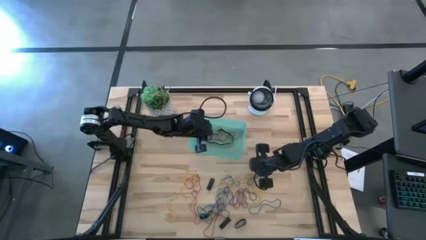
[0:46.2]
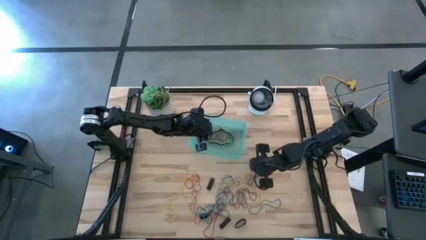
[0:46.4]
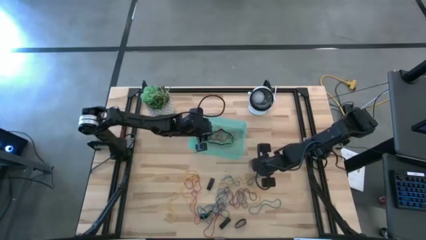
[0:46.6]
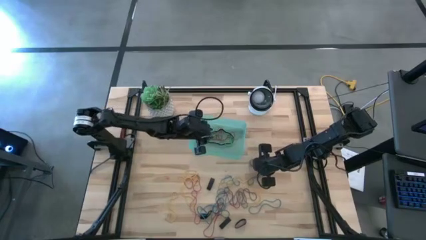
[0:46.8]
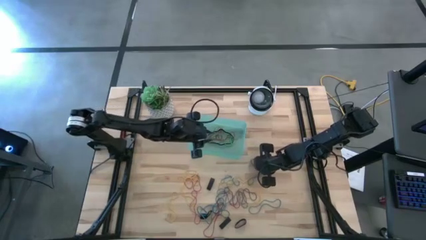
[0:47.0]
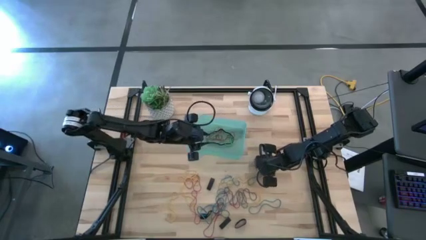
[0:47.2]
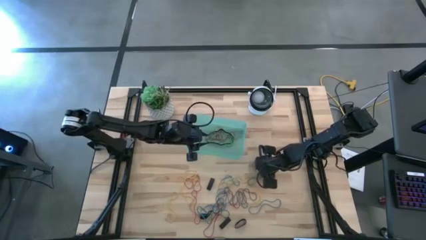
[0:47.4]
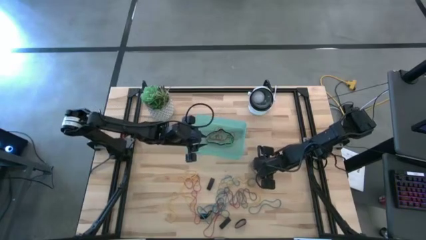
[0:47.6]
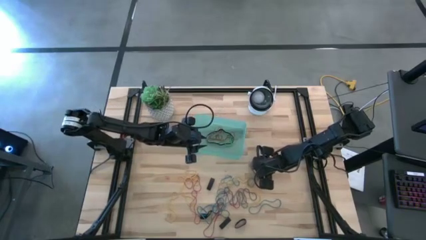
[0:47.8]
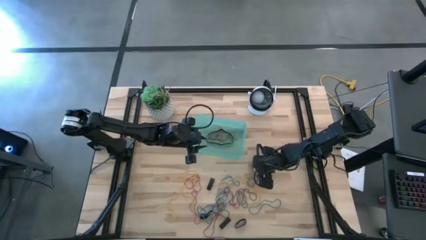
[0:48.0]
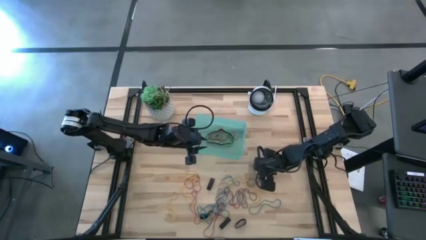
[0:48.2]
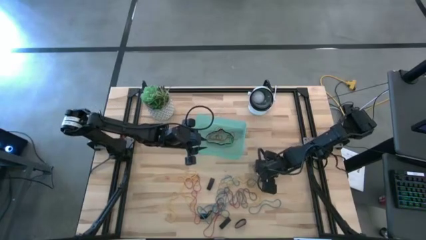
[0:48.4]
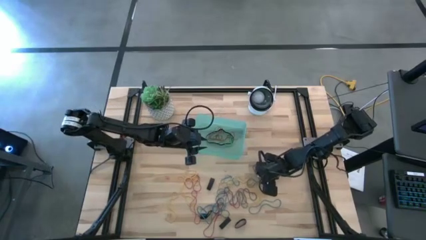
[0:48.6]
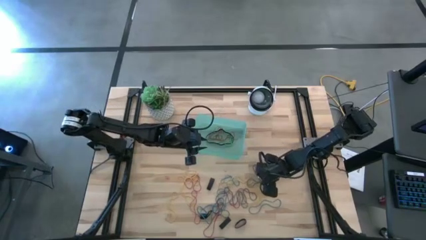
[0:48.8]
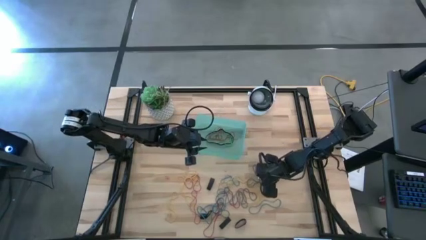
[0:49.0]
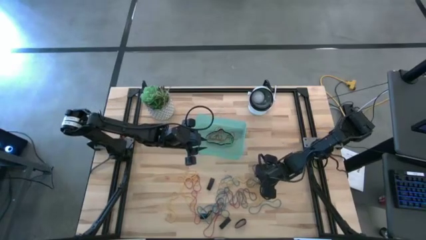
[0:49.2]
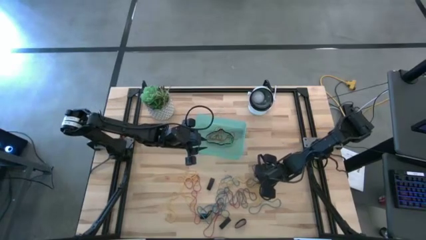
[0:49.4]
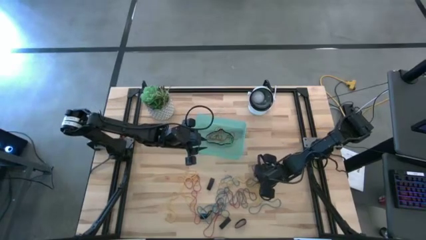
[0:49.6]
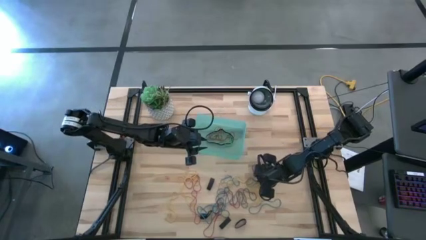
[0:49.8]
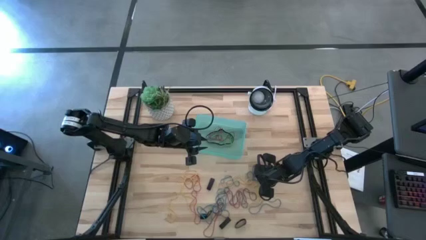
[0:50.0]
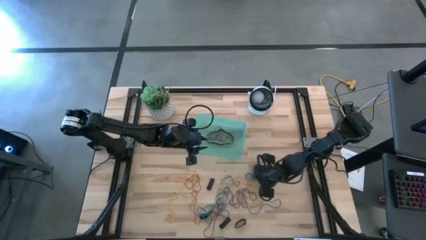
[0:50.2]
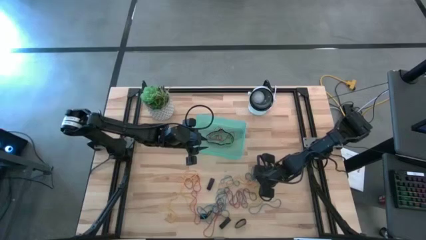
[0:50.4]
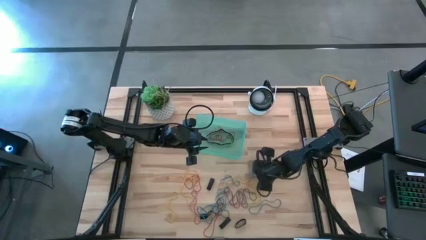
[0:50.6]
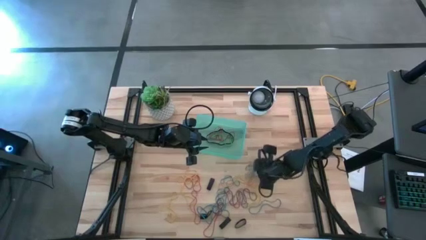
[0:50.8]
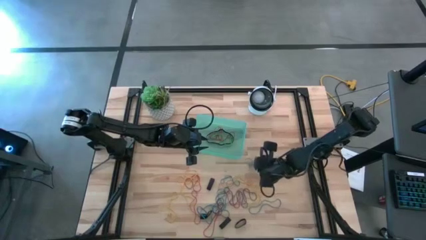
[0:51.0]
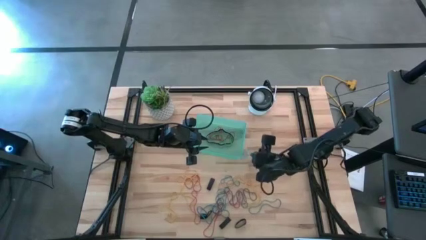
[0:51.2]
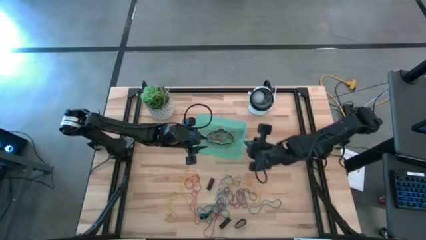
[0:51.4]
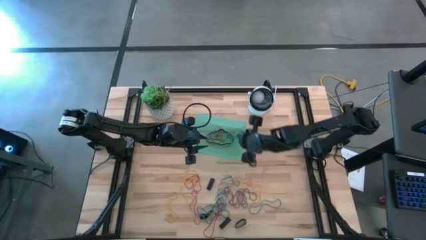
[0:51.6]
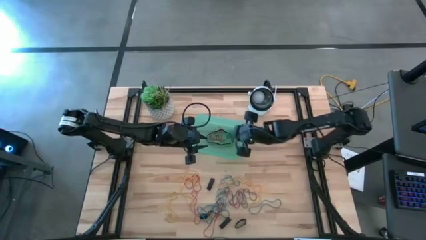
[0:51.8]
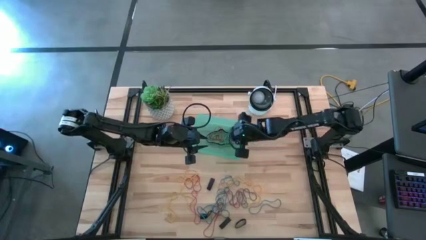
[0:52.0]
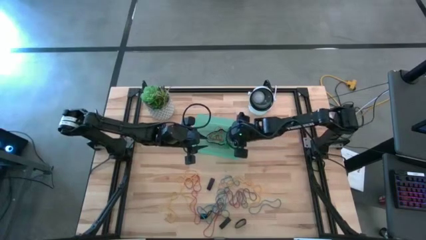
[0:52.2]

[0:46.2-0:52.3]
Task: Pick and place rubber bands into bin
Put the blue rubber band into the green bin

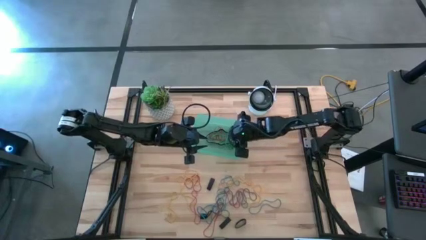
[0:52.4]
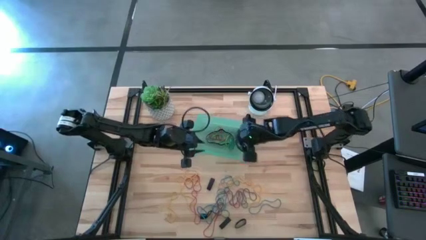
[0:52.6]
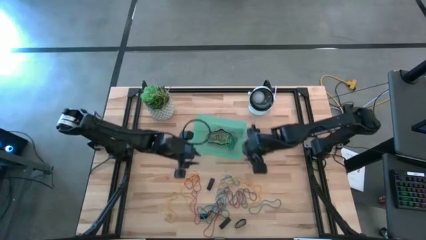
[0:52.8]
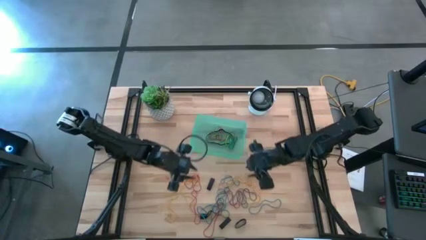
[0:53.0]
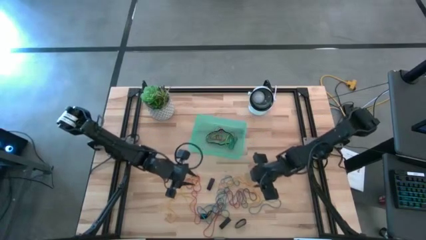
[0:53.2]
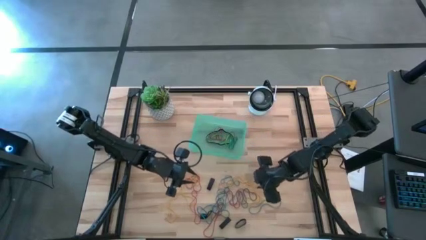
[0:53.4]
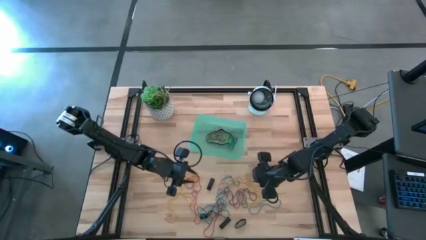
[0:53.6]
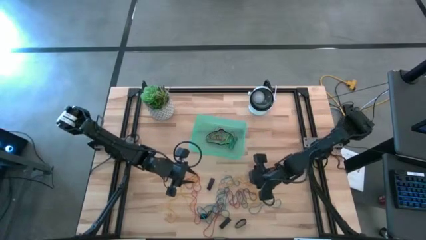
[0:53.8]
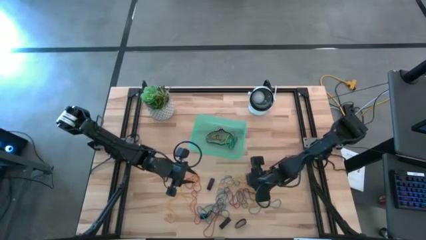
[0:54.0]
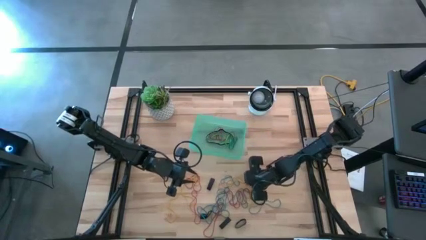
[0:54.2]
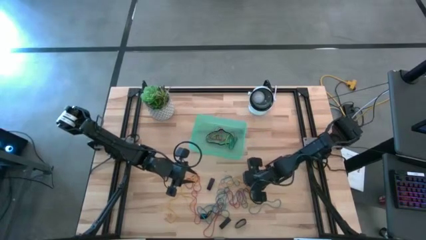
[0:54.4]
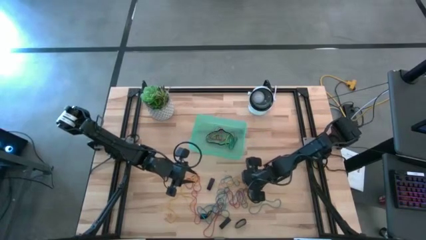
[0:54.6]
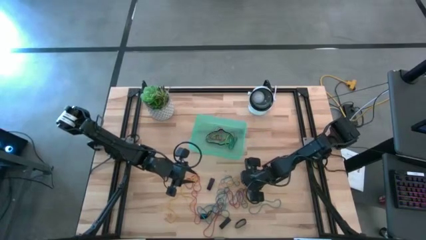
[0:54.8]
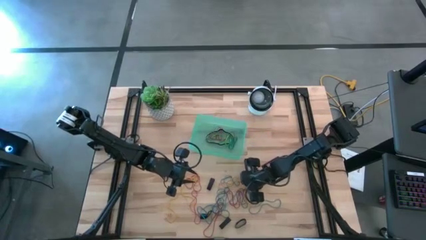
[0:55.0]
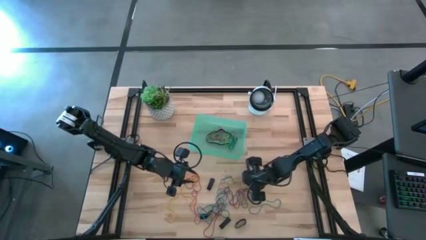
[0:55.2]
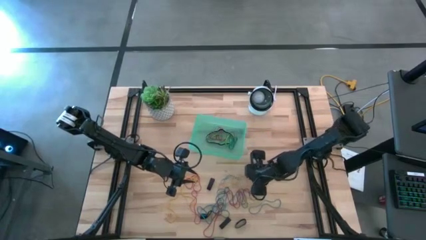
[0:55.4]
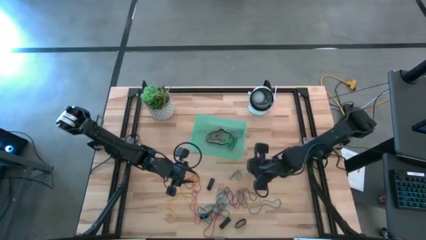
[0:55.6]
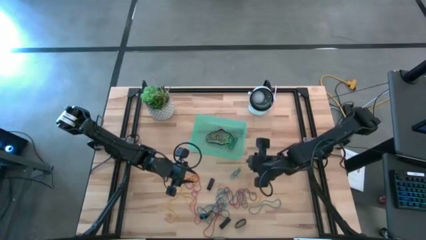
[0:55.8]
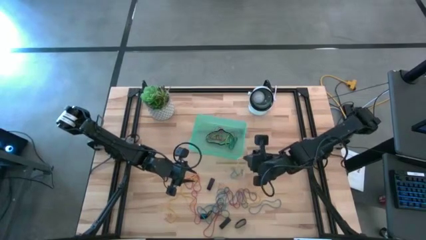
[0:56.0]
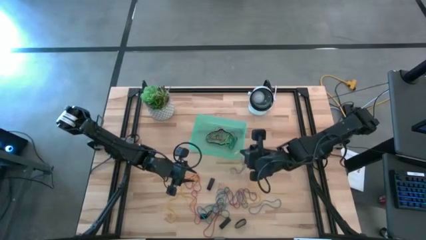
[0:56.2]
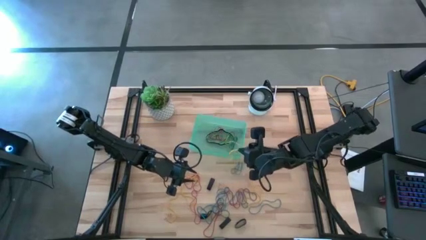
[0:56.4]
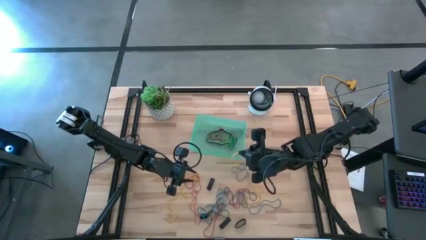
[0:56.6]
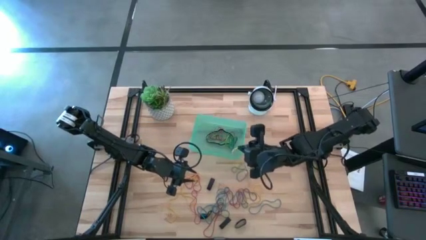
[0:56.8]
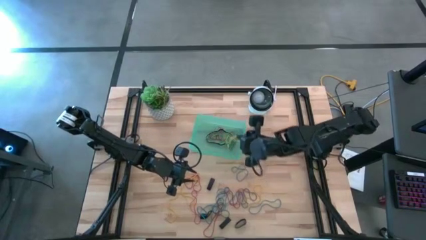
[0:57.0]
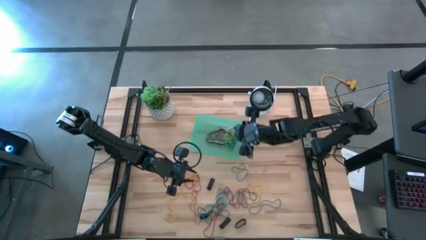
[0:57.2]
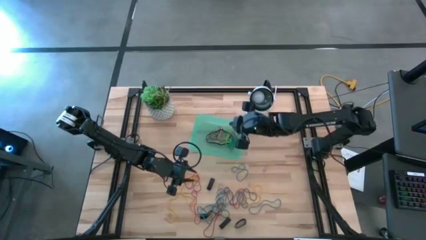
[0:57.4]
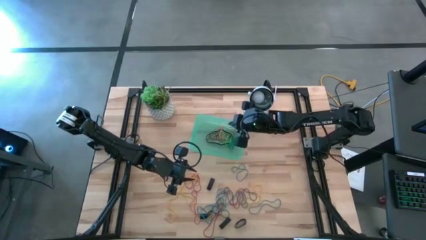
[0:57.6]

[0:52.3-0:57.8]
Put the yellow rubber band into the green bin

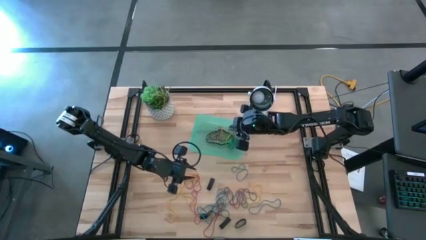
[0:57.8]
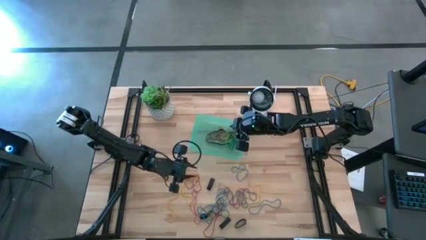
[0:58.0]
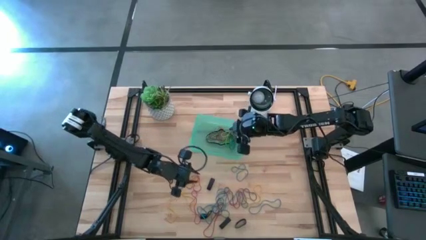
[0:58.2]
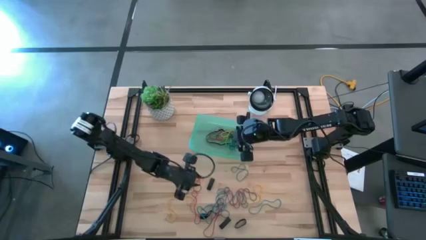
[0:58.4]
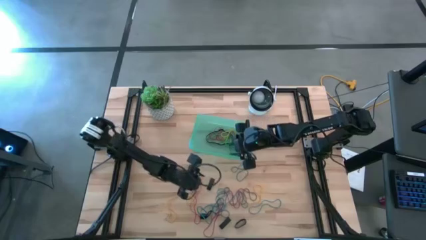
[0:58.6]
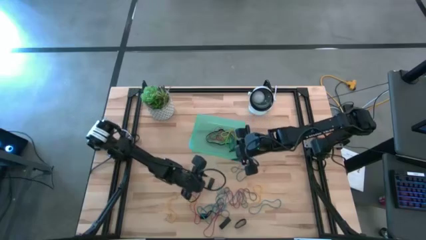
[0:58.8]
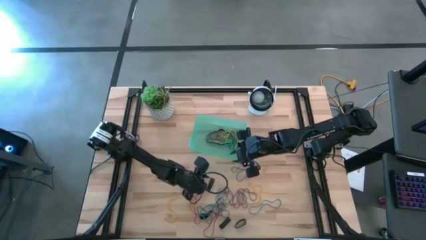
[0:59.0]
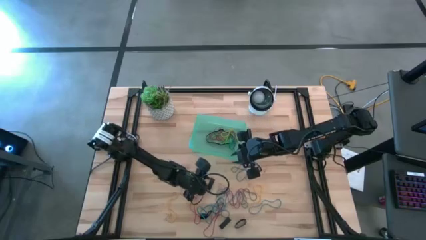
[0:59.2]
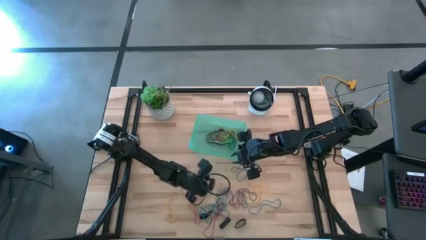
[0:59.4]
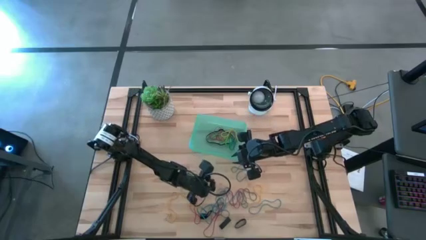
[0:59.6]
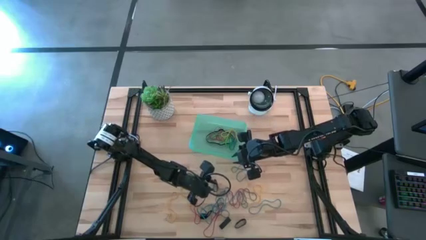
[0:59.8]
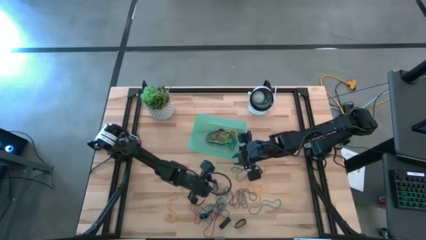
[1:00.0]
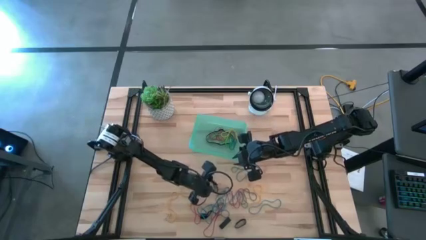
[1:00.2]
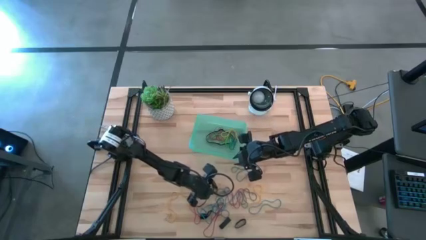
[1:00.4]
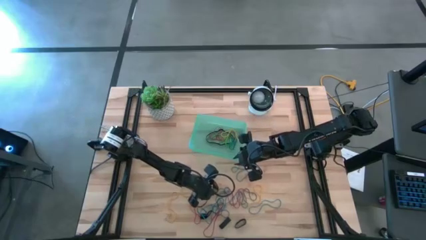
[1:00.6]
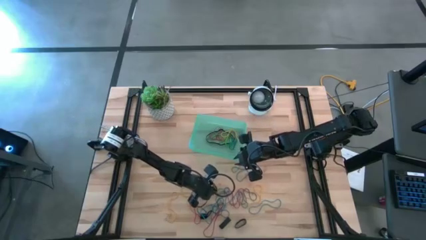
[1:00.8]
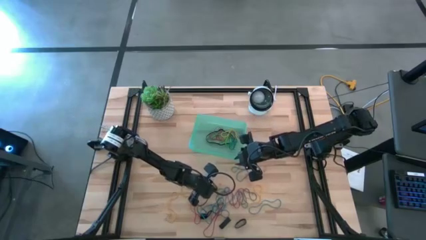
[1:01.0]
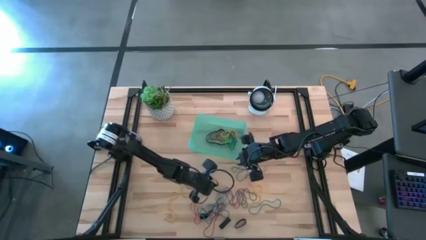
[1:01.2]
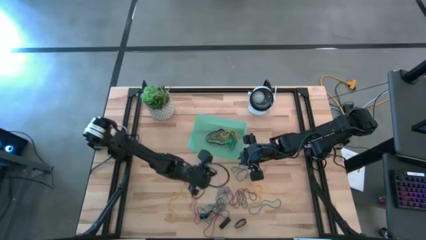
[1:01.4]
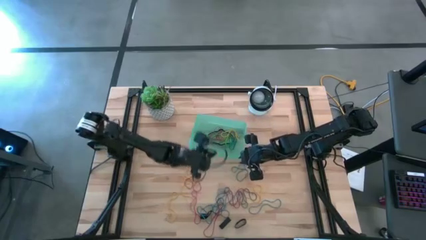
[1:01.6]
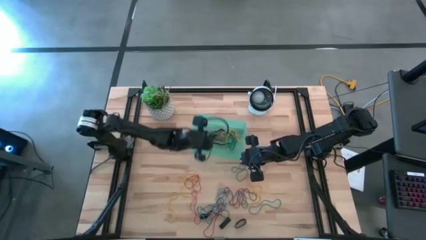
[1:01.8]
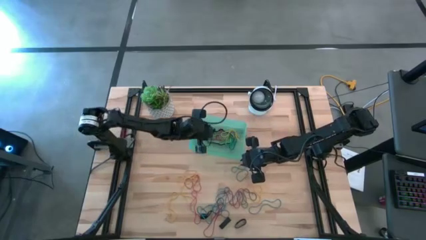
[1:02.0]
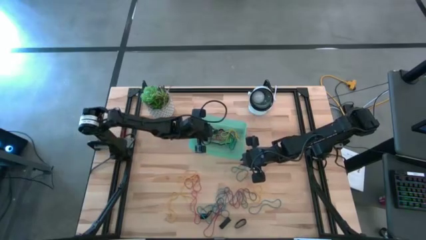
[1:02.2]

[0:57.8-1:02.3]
Put the black rubber band into the green bin

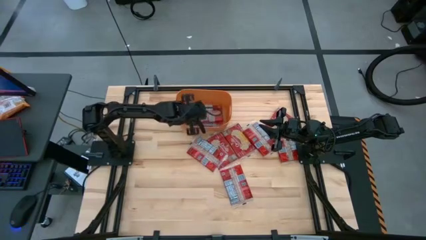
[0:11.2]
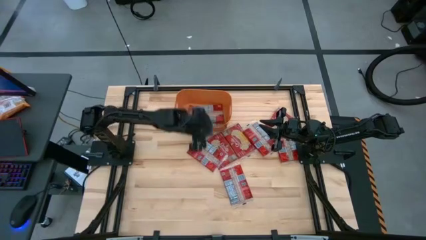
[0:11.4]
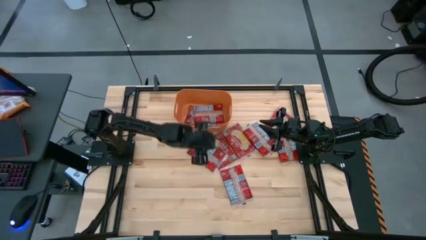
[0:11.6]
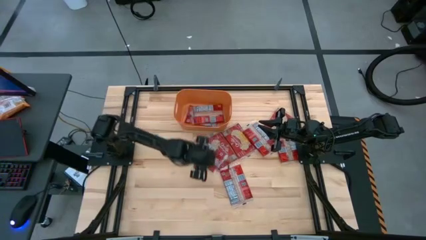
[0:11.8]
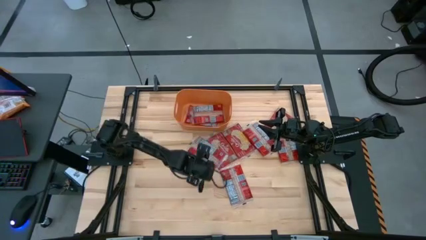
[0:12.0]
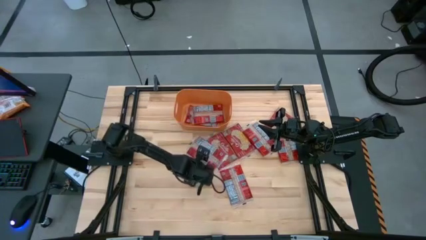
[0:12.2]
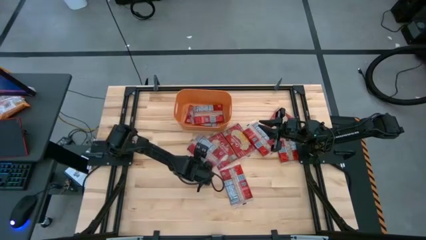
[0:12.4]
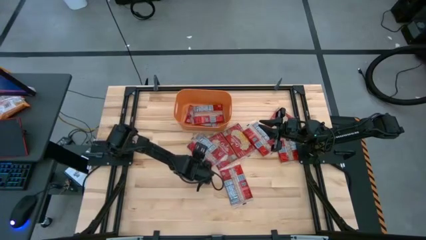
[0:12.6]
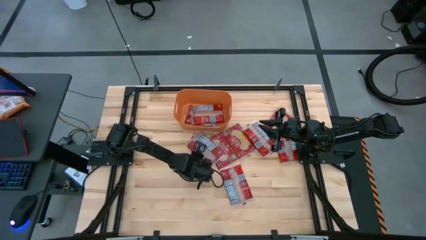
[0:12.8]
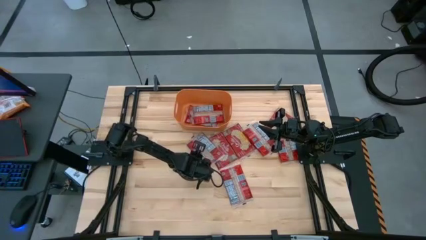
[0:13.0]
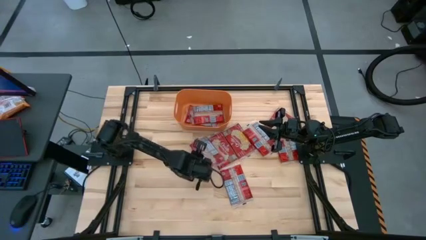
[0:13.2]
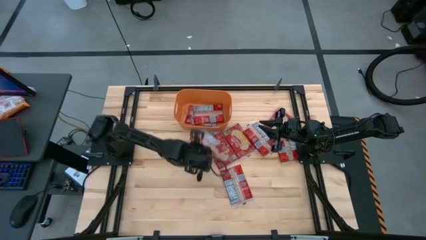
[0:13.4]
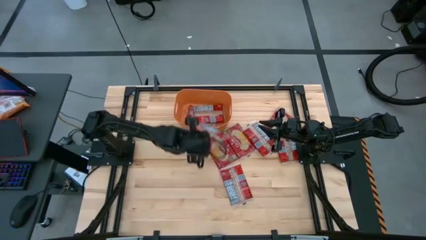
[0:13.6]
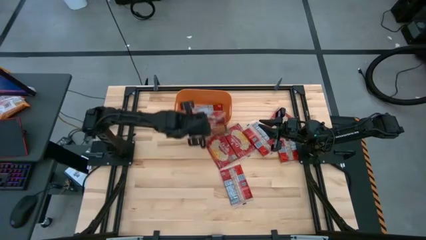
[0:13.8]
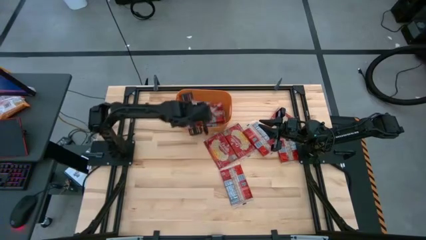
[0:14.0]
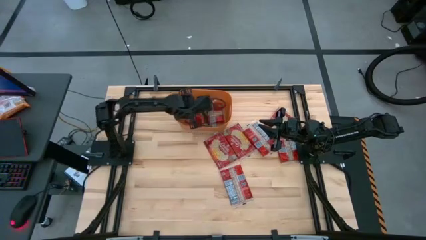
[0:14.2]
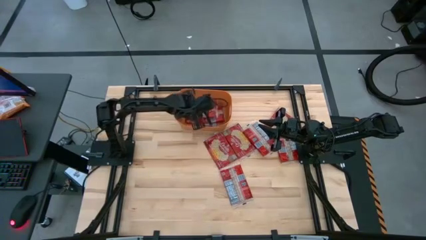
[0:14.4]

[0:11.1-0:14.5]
Task: Sort popcorn bags into baskets
Put the red popcorn bag into the orange bin
